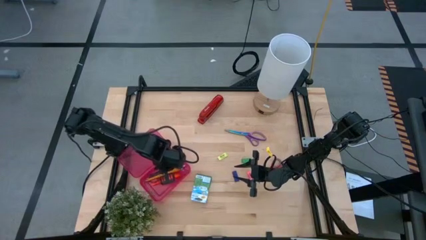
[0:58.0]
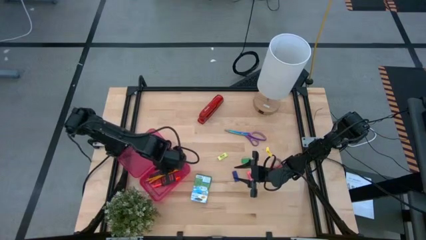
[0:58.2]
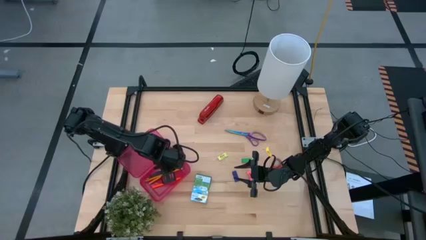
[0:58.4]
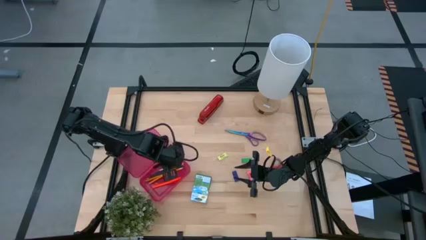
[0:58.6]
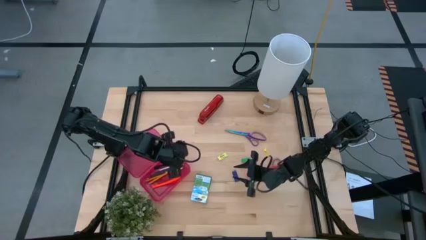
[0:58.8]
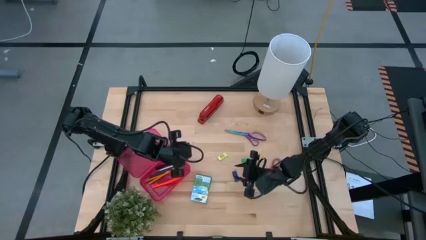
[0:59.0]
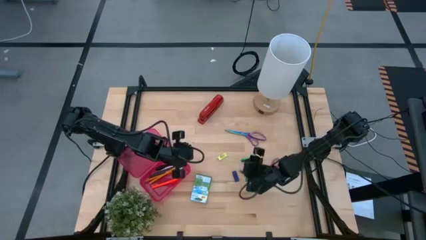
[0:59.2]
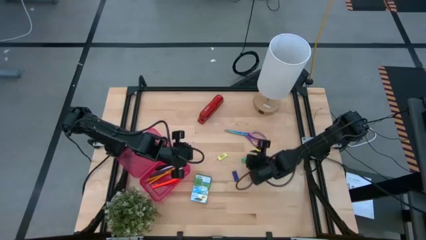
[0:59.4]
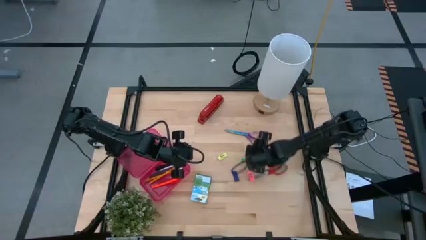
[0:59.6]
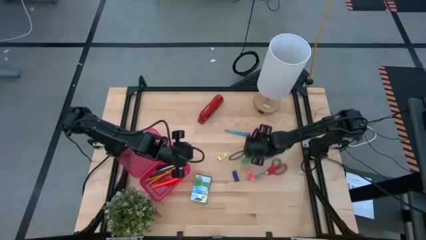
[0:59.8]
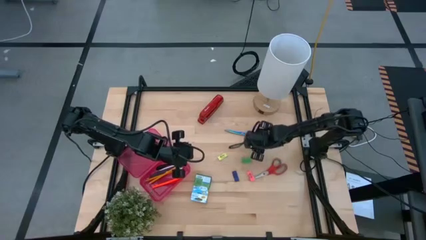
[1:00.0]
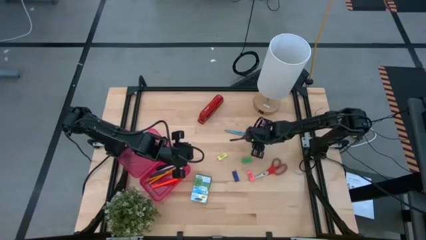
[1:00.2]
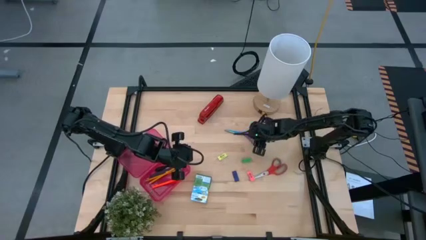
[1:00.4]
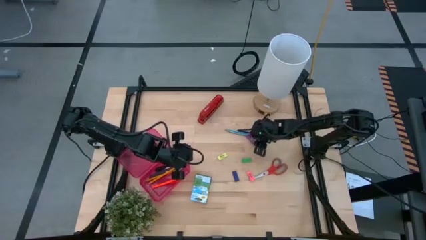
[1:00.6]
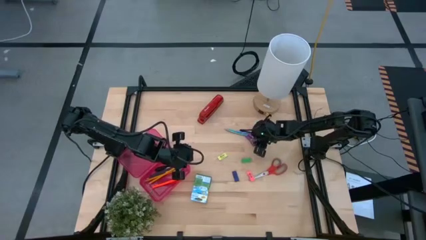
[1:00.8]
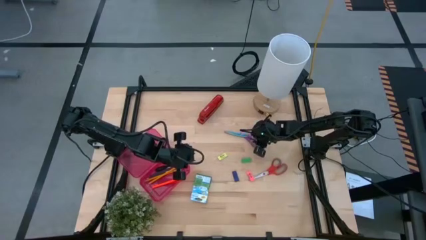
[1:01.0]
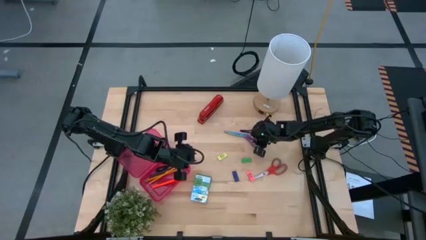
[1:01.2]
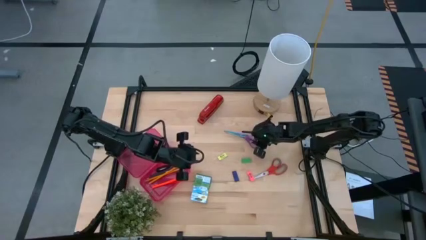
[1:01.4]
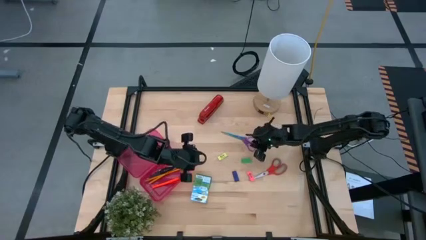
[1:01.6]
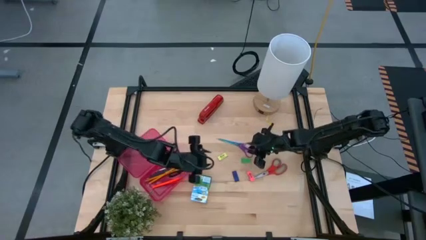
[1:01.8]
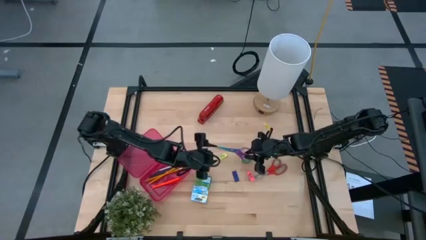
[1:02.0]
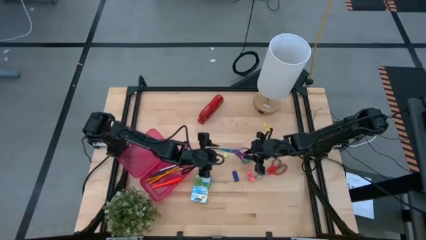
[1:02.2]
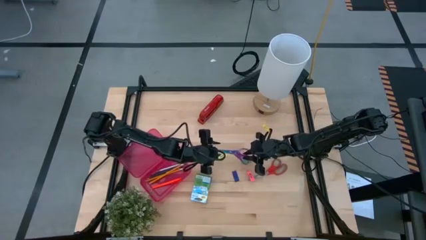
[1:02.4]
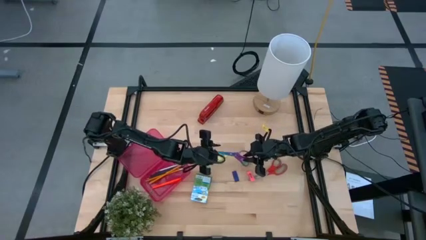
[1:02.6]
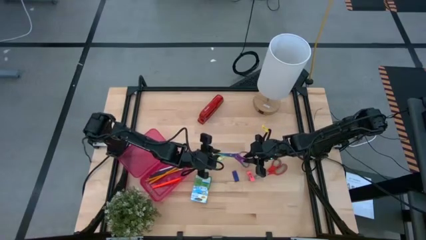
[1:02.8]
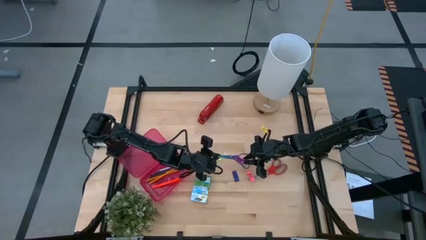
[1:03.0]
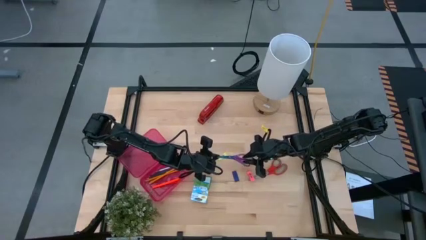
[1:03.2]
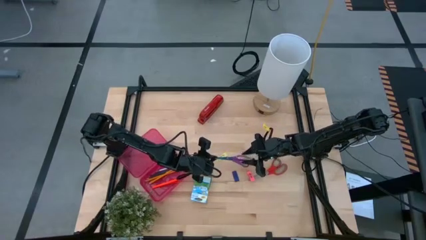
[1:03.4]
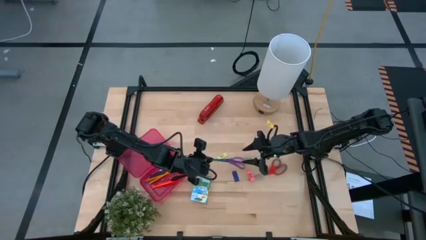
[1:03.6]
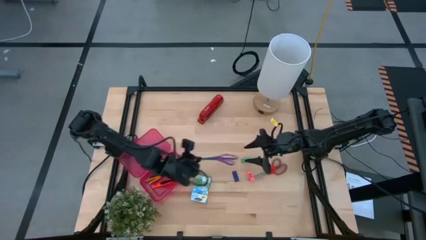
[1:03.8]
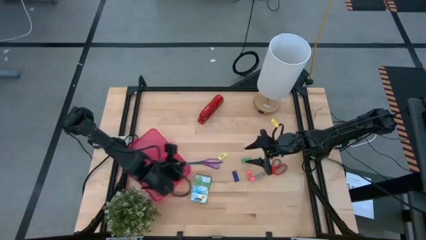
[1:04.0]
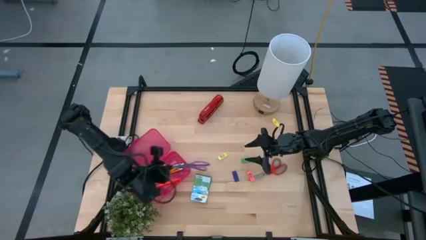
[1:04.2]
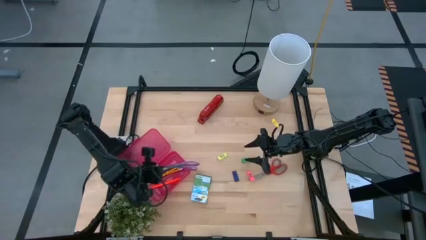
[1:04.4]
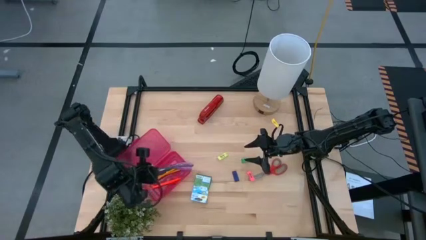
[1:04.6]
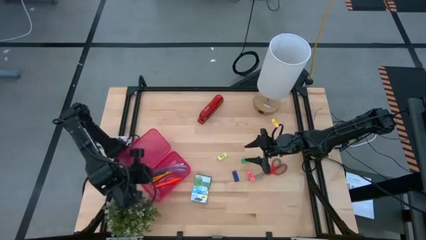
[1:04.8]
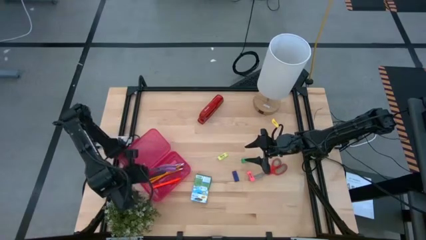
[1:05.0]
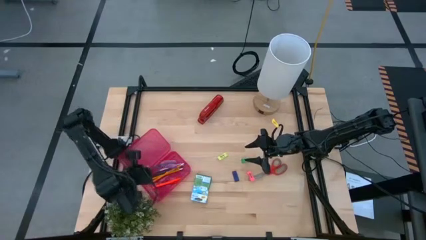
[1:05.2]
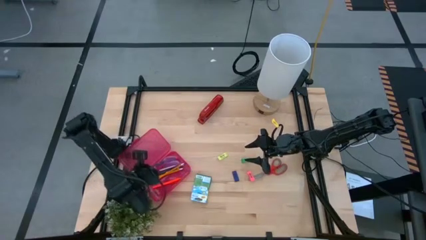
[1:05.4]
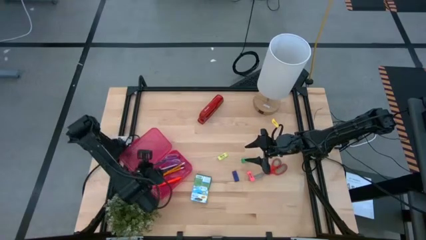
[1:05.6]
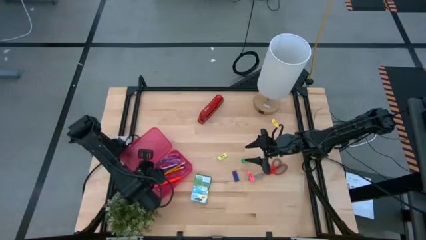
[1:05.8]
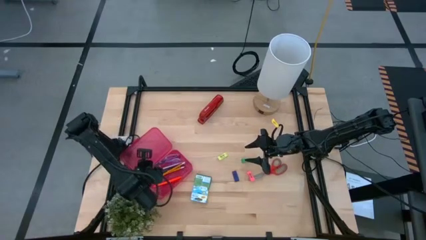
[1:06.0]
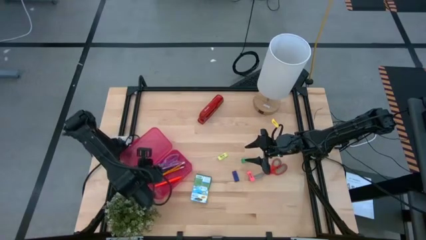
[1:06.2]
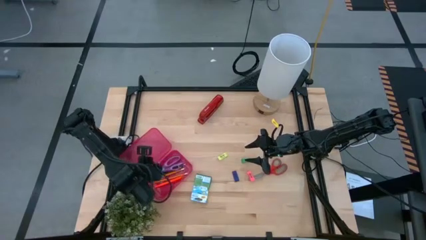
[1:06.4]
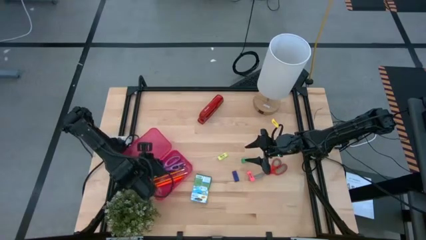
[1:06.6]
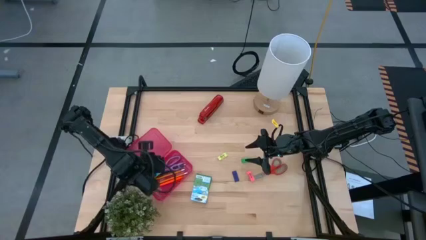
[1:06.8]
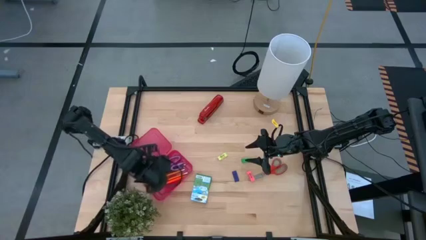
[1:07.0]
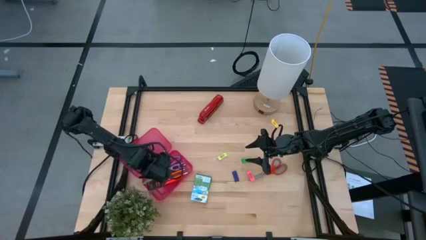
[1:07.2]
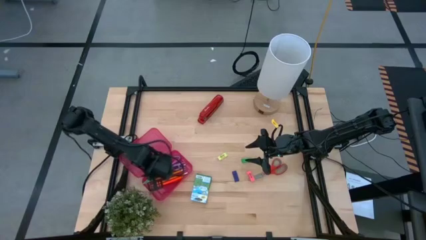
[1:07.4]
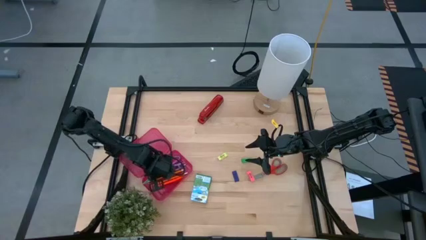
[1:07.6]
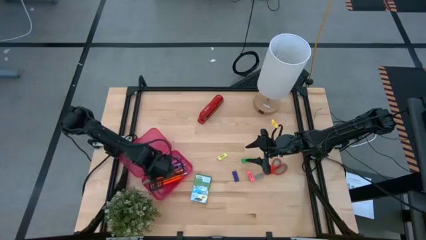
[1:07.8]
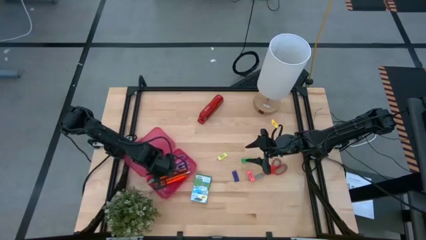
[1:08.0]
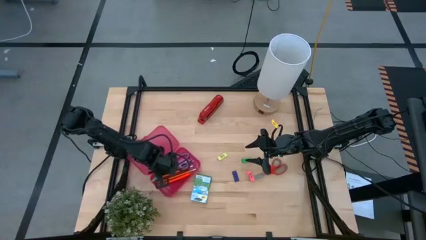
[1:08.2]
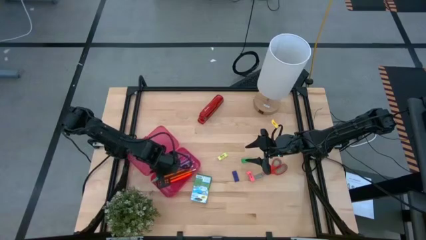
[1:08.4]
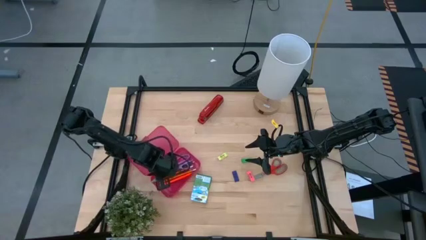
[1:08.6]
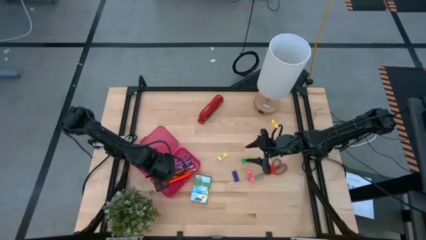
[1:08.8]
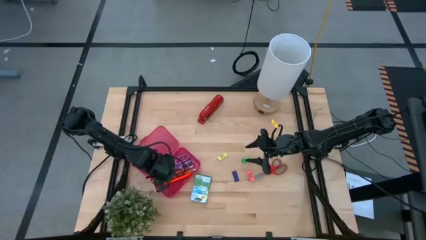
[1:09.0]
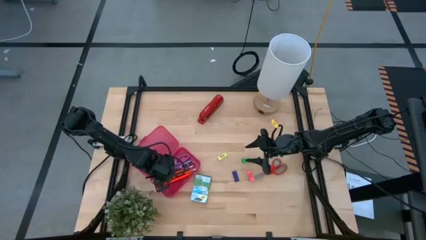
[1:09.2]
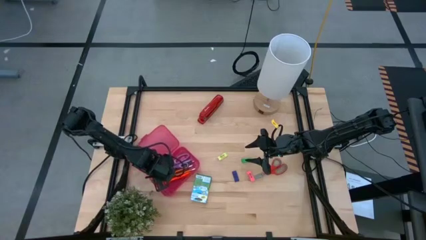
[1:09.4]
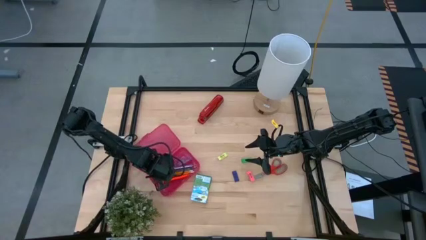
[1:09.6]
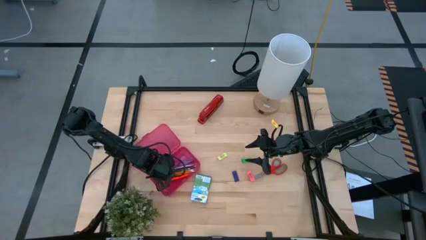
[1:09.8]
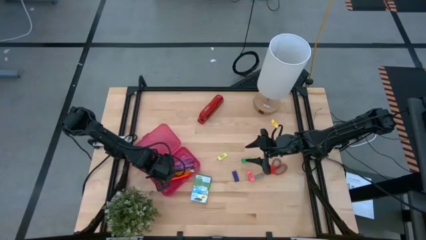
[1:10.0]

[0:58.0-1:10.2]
Task: Pack school essentials
Put the purple scissors into the red supply box
